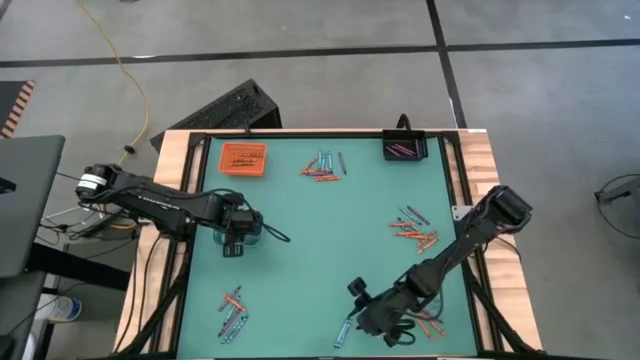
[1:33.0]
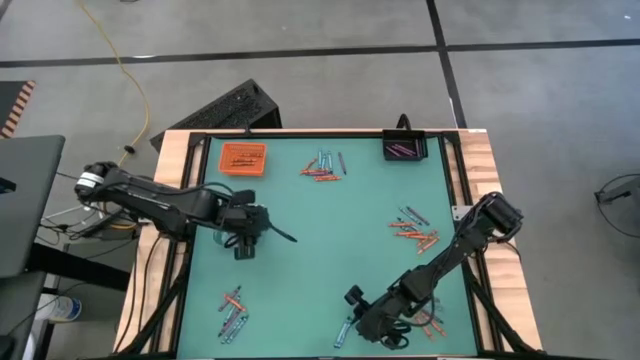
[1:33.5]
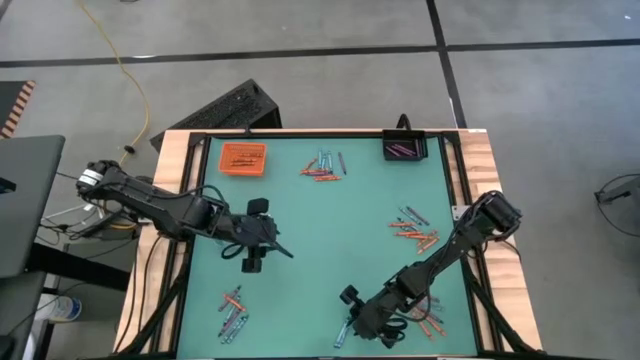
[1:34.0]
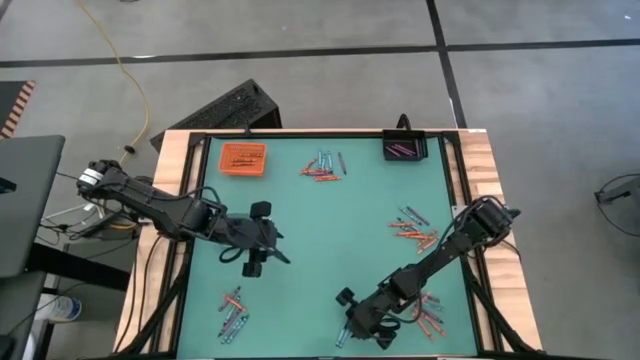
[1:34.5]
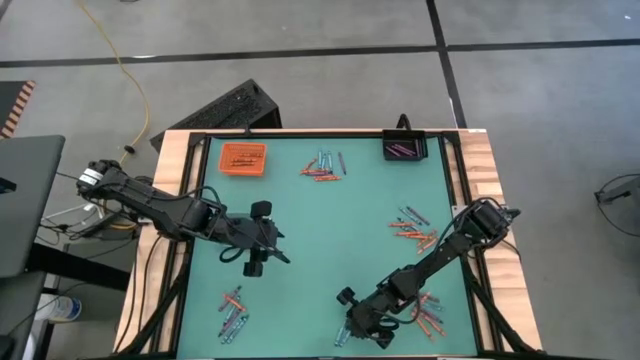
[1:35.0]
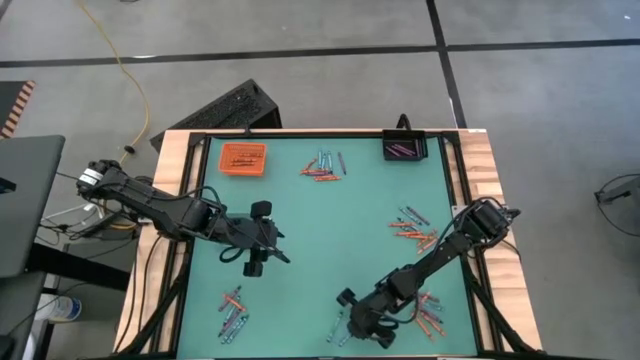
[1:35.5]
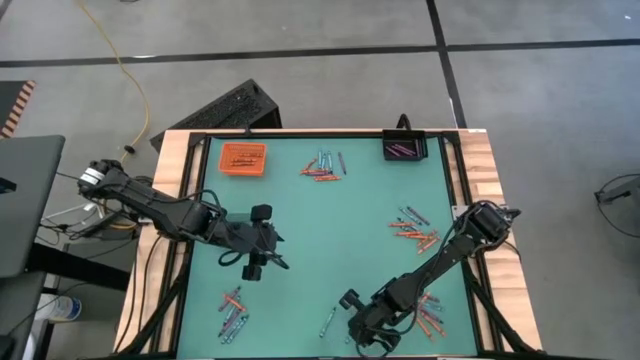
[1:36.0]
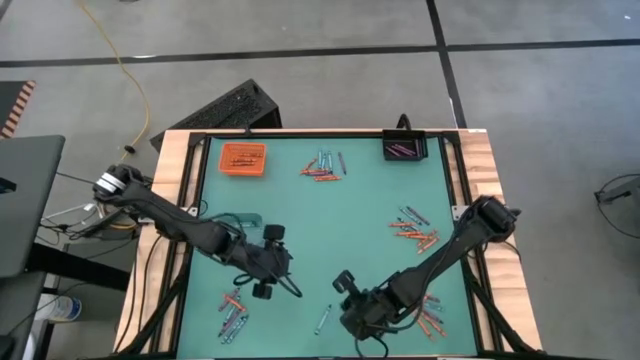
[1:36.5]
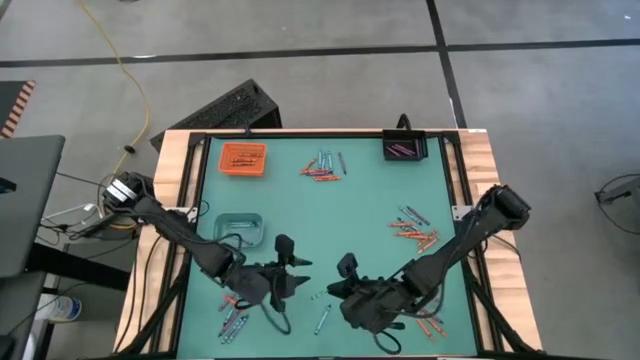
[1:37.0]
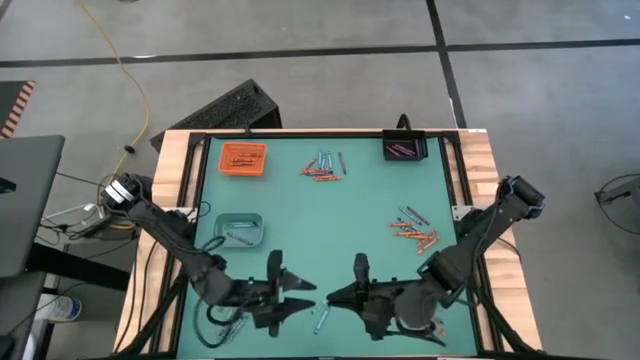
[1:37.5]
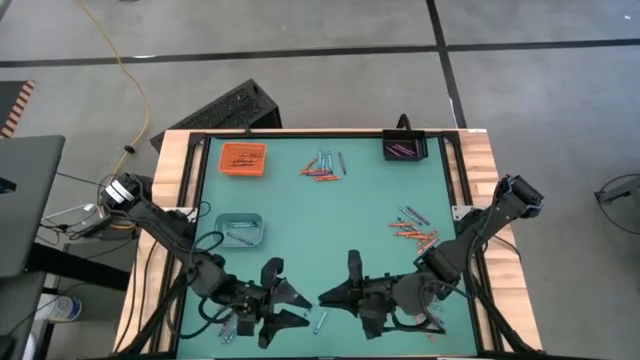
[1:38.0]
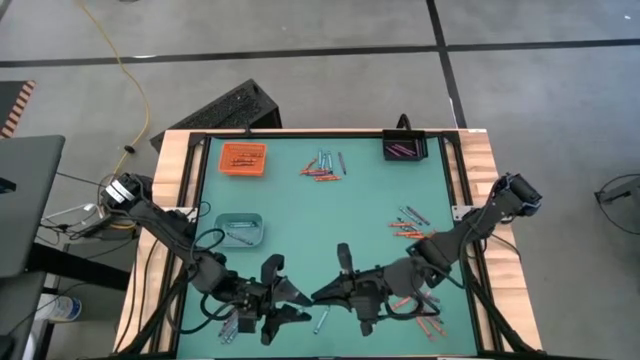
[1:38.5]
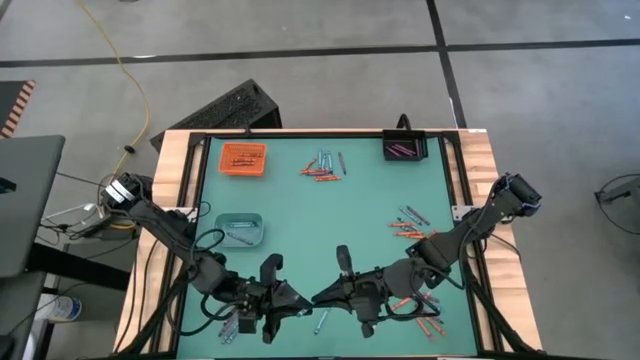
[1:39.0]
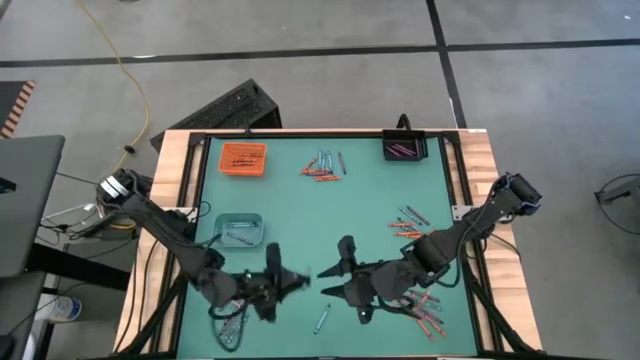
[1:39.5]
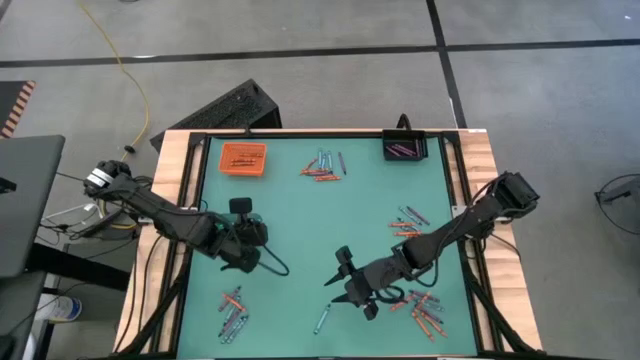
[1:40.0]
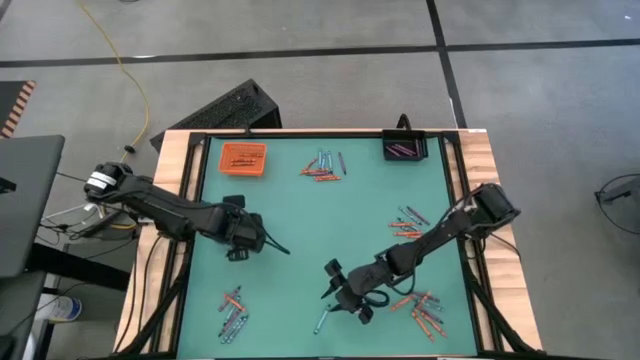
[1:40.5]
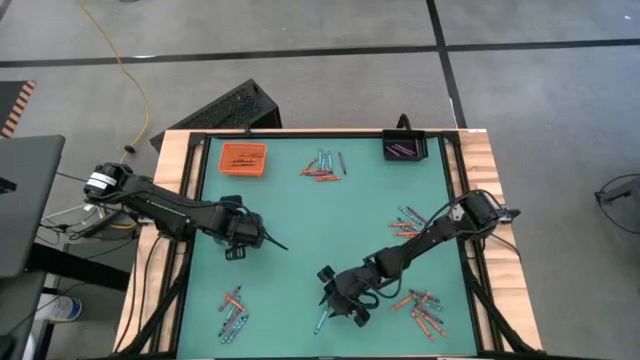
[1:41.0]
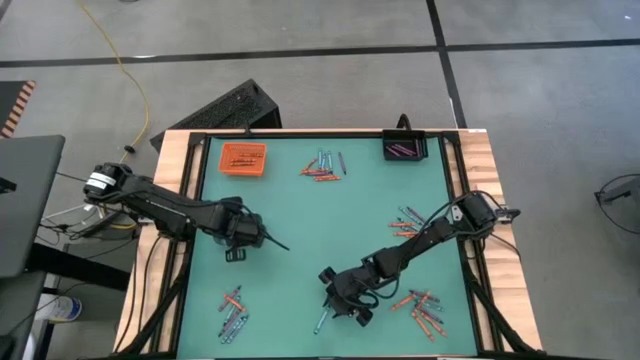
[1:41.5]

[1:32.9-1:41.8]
Task: Sort crayons
Put the blue crayon into the blue bin

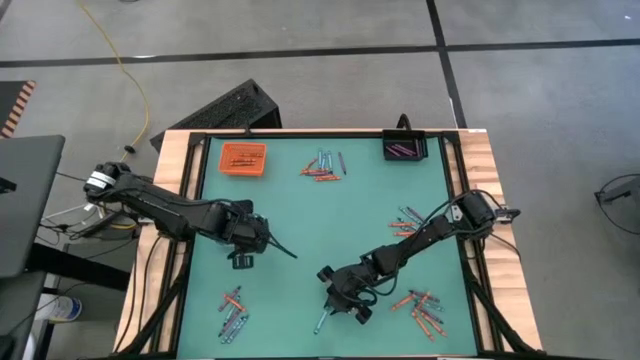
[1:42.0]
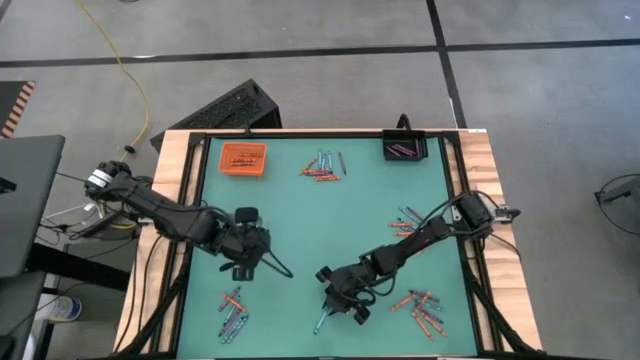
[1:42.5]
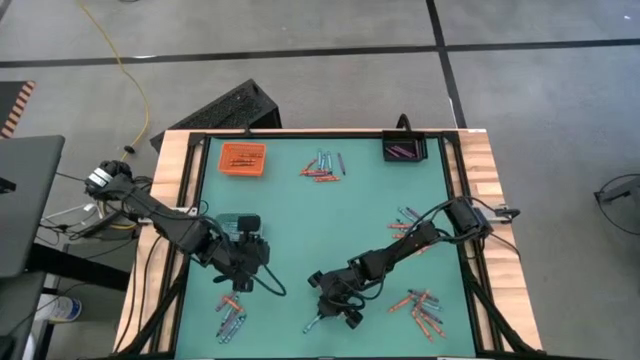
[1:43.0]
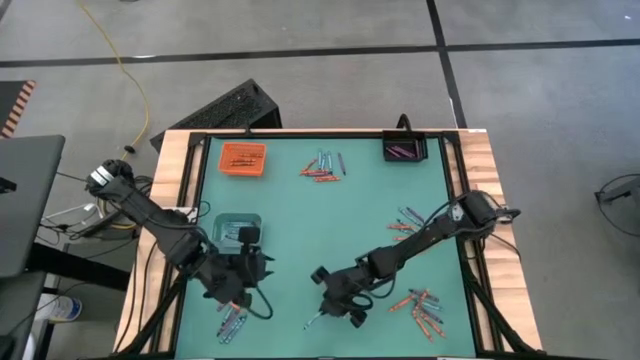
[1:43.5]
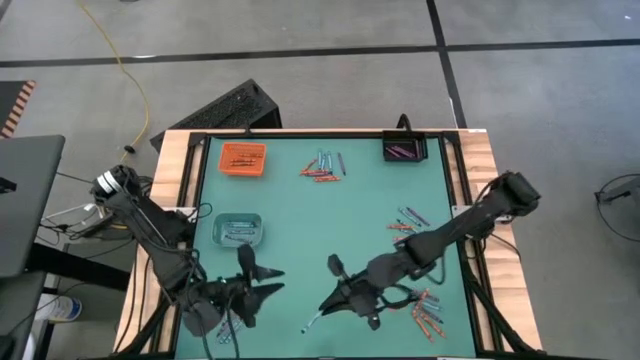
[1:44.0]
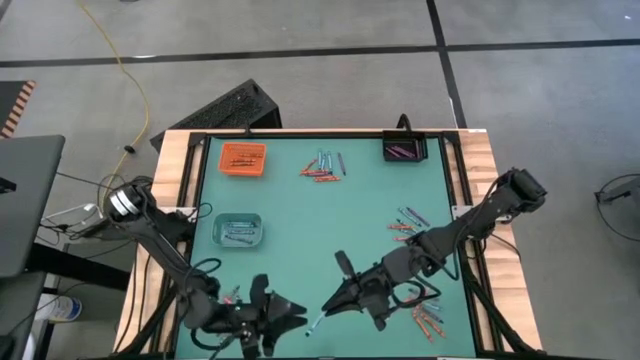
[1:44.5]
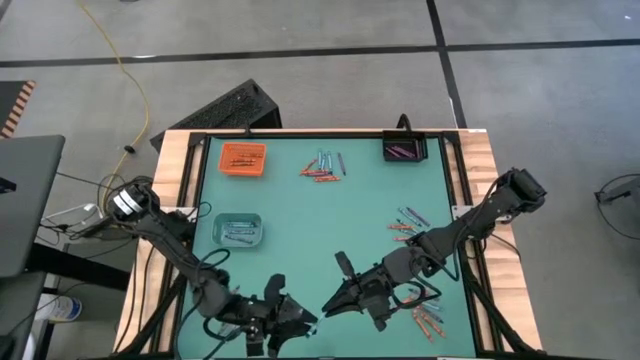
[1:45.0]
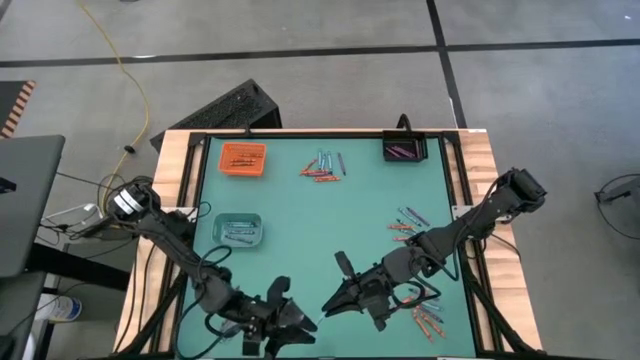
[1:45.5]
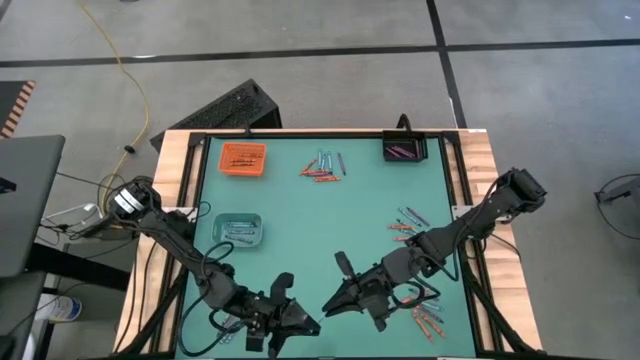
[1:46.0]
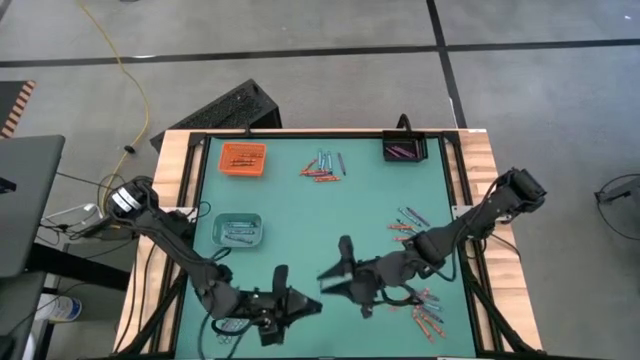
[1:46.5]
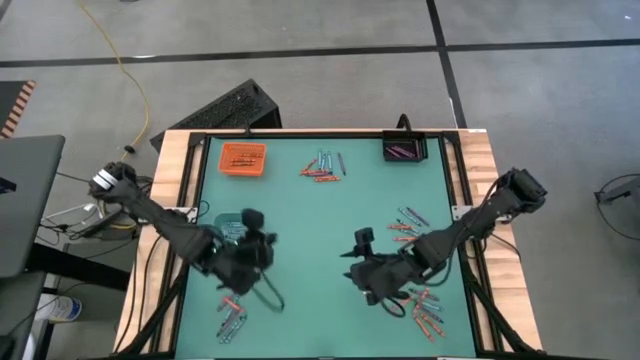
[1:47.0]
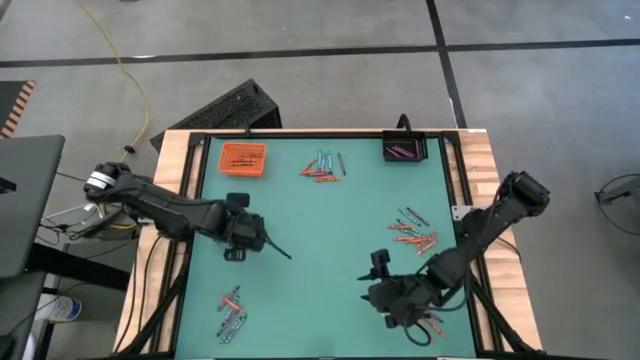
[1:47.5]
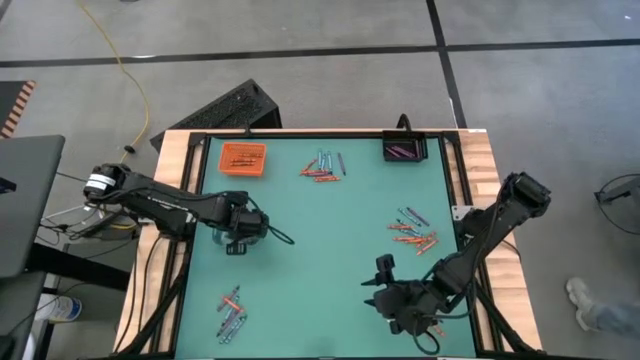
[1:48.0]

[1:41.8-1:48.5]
Put the middle bottom blue crayon into the left blue bin

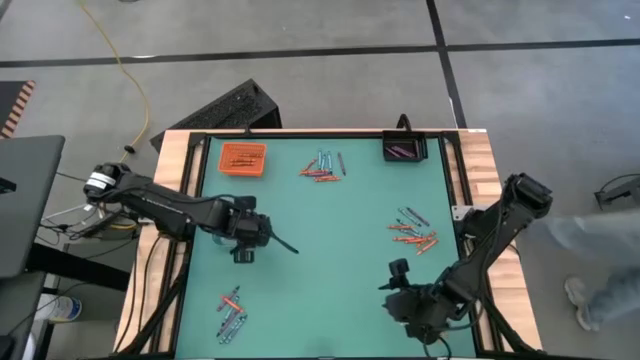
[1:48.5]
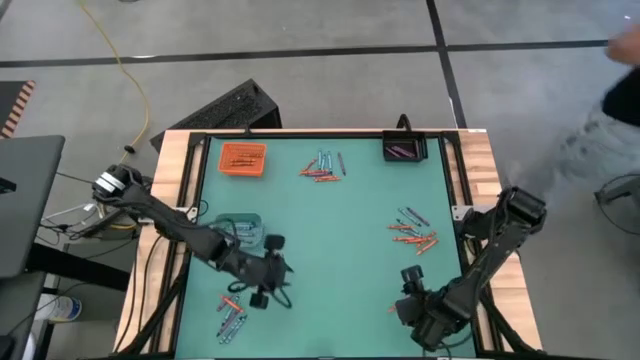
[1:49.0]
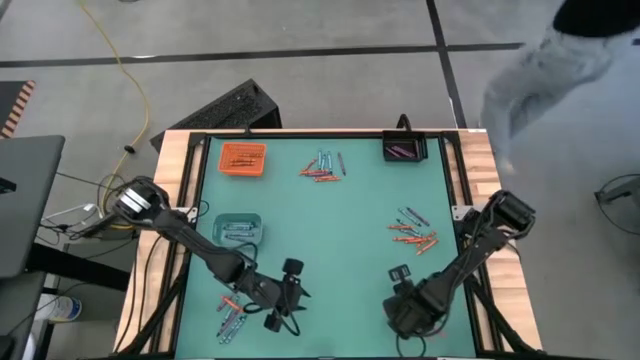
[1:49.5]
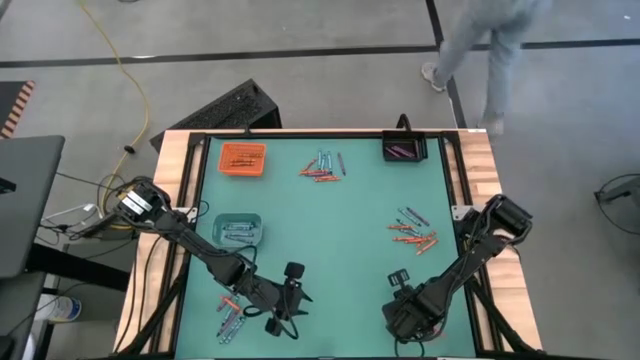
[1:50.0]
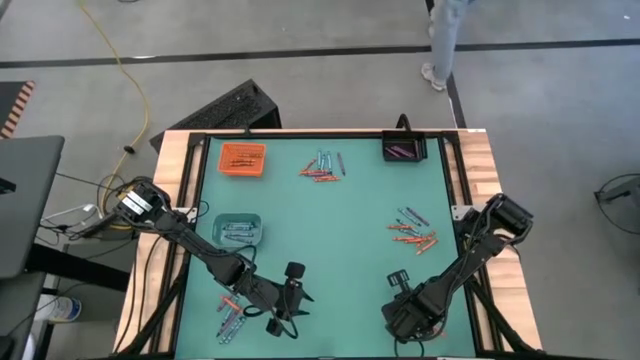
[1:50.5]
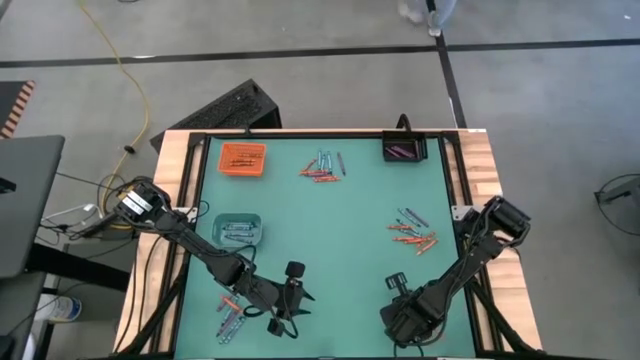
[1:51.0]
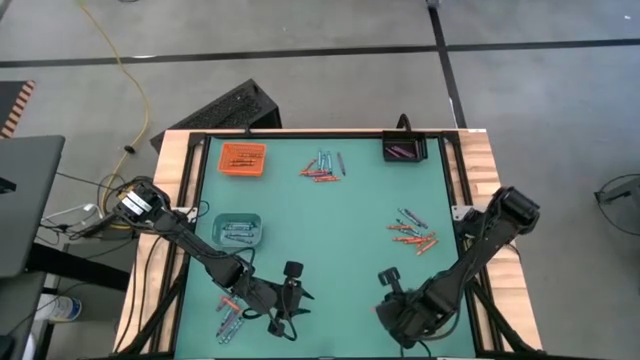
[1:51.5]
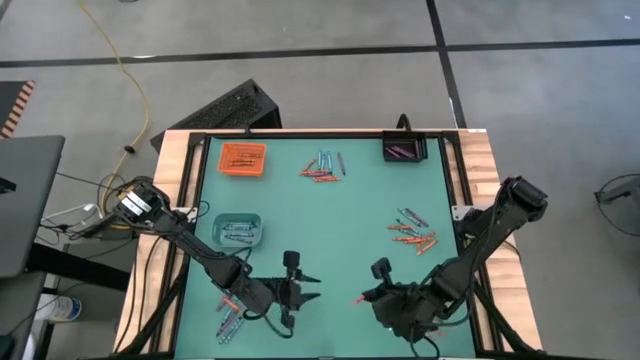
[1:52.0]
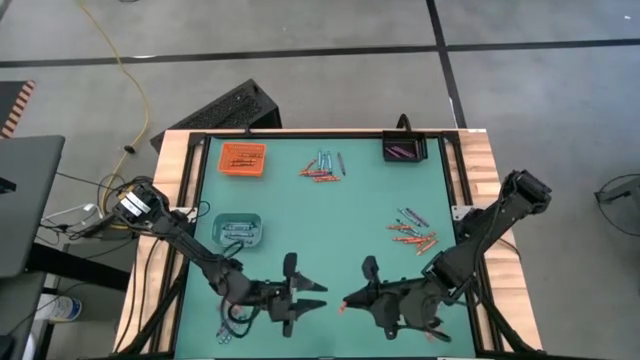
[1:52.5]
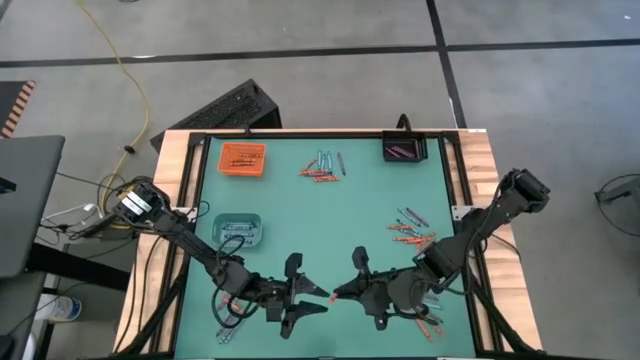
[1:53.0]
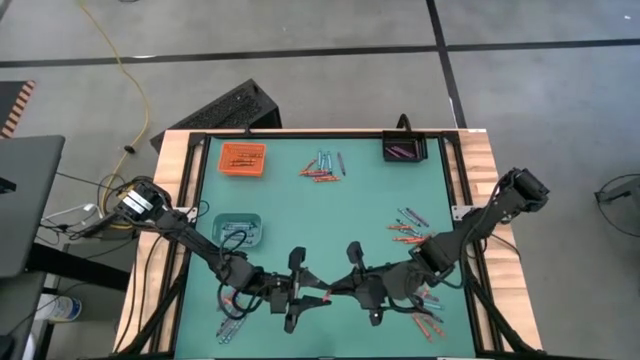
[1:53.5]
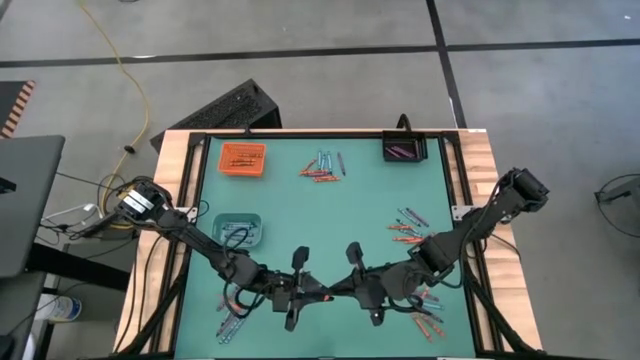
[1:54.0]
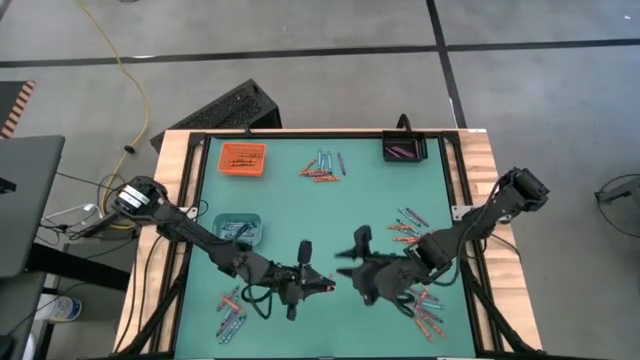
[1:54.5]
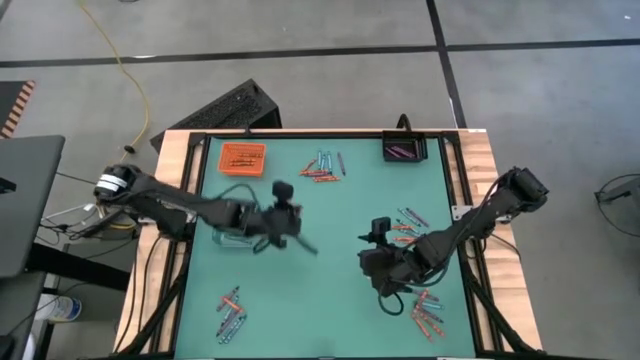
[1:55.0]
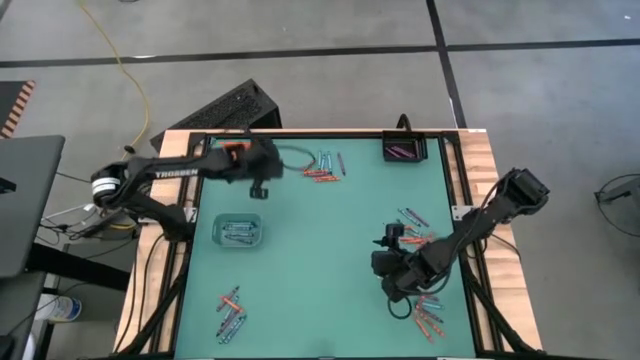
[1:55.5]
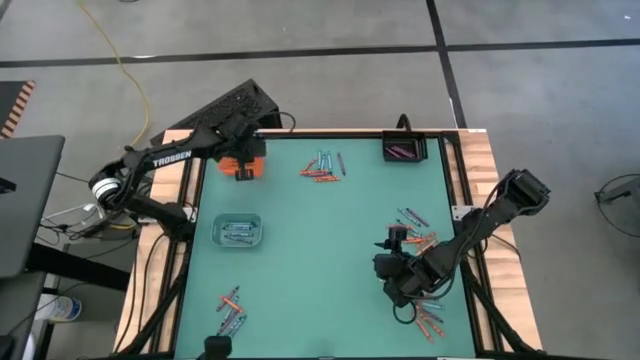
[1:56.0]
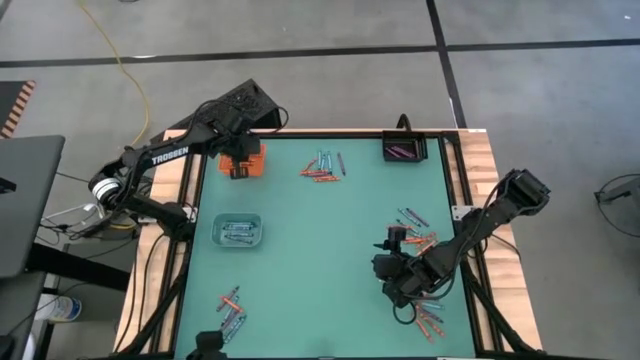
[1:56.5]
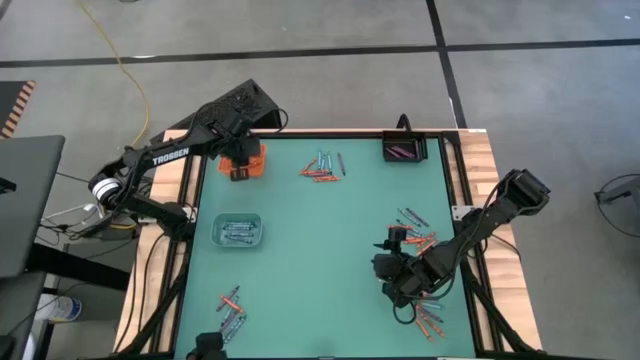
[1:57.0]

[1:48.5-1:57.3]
Put the orange crayon into the top left orange bin
